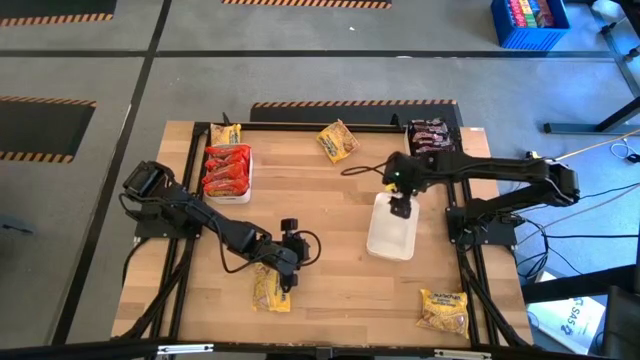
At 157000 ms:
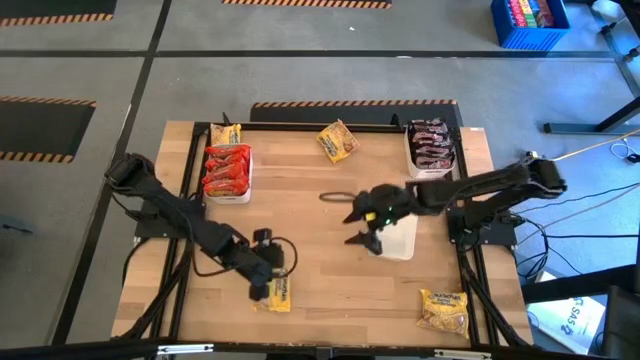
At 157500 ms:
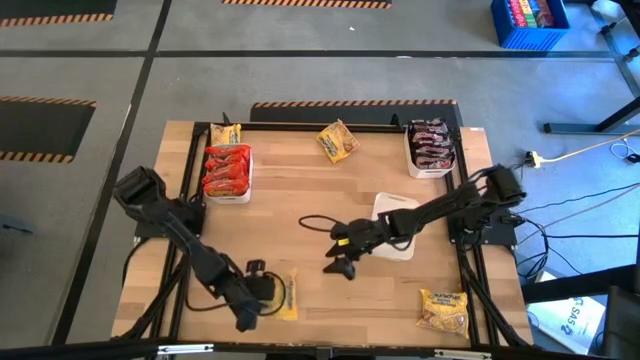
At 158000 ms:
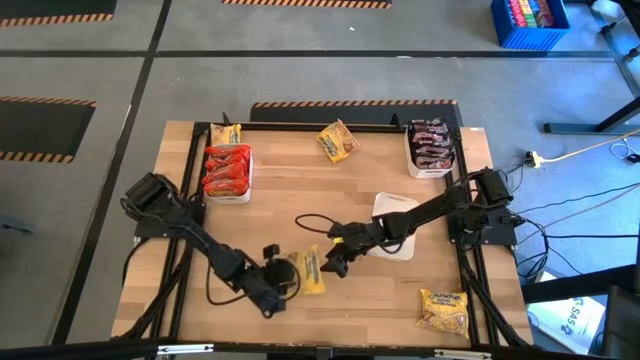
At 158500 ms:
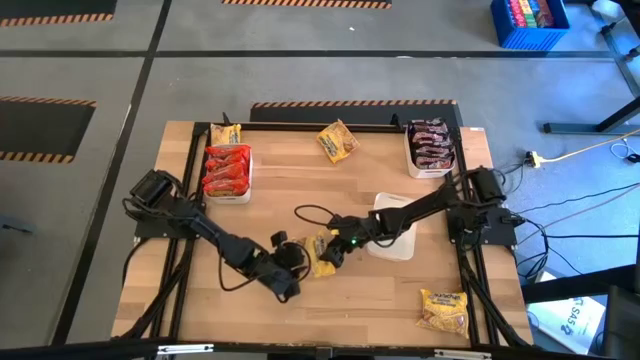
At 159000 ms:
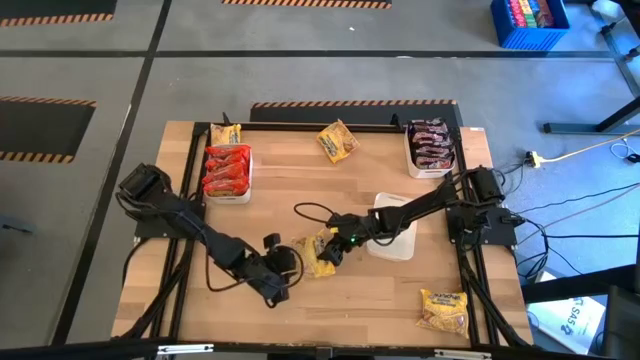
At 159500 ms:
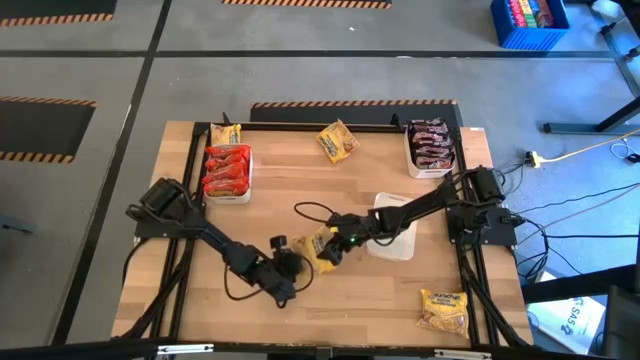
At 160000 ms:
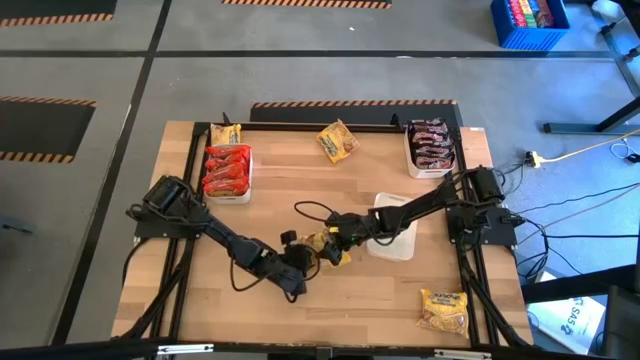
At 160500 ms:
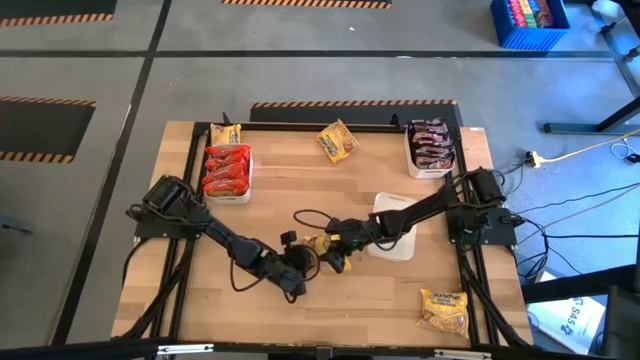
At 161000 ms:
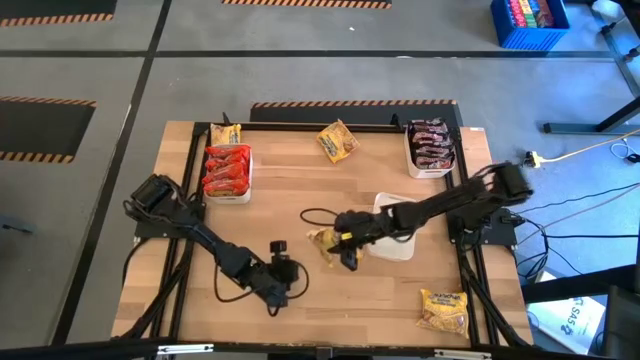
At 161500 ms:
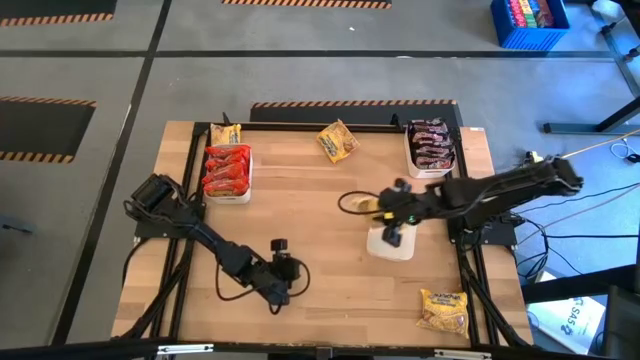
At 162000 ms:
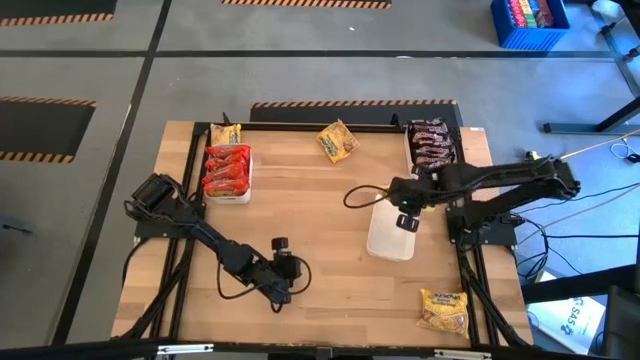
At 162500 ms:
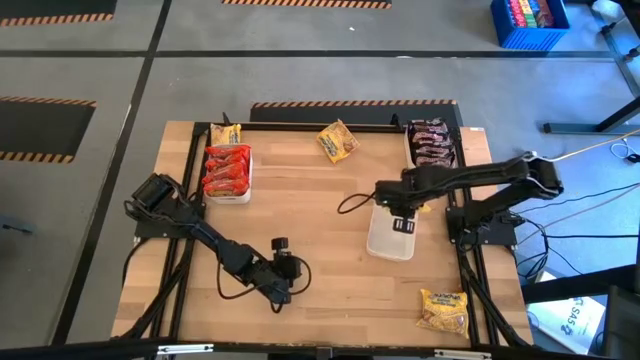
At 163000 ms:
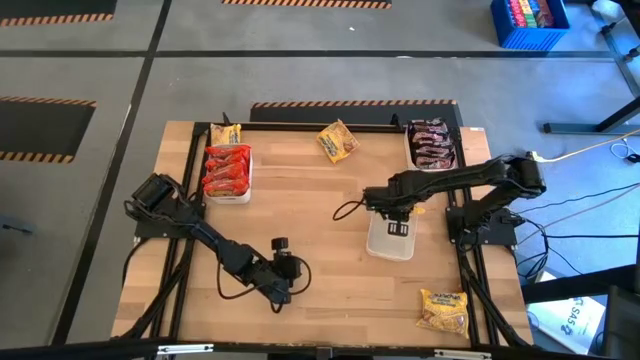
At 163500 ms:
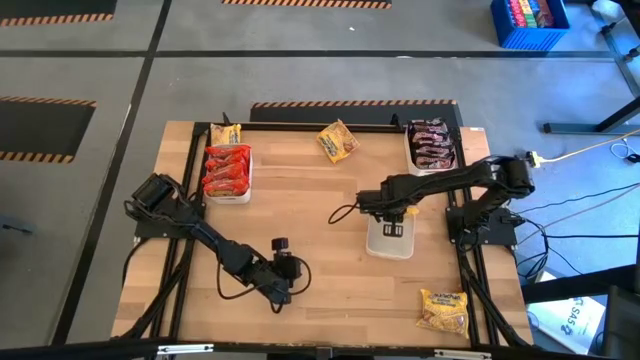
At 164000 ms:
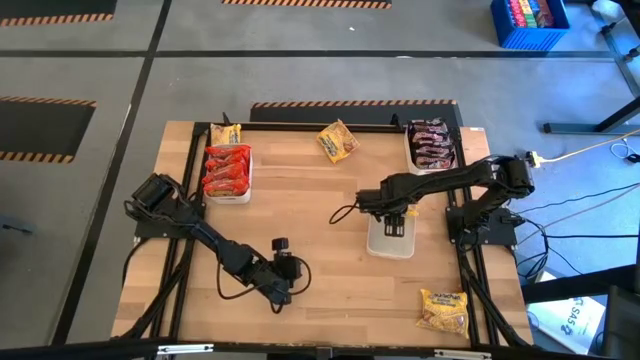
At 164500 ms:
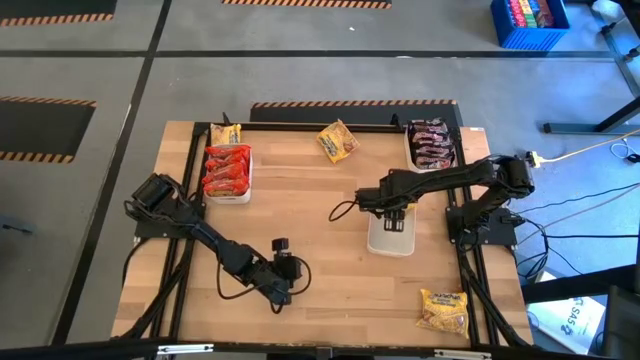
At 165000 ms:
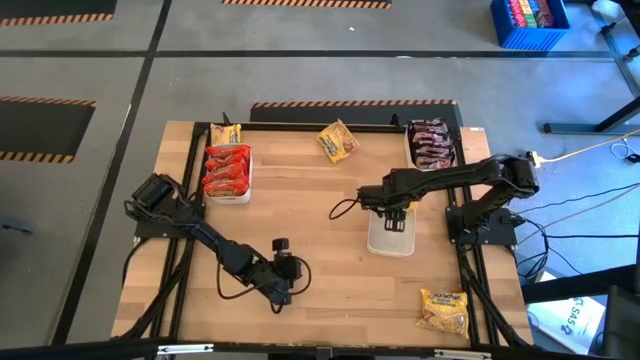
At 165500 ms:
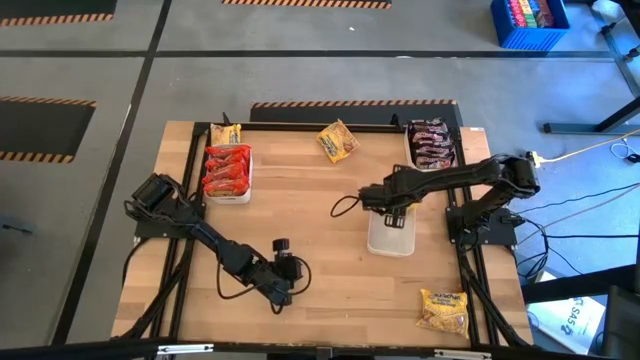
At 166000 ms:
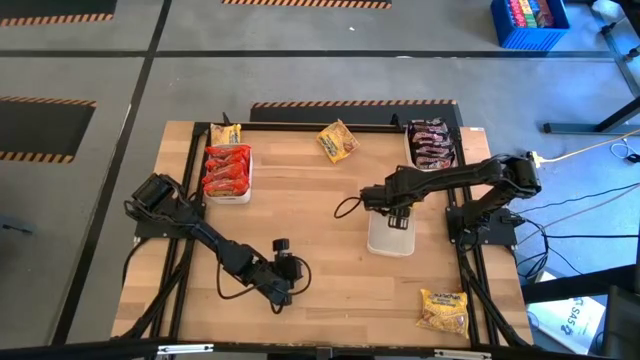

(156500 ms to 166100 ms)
Task: Sort Maruchan noodles
Put the bottom left yellow noodle into the bottom white bin

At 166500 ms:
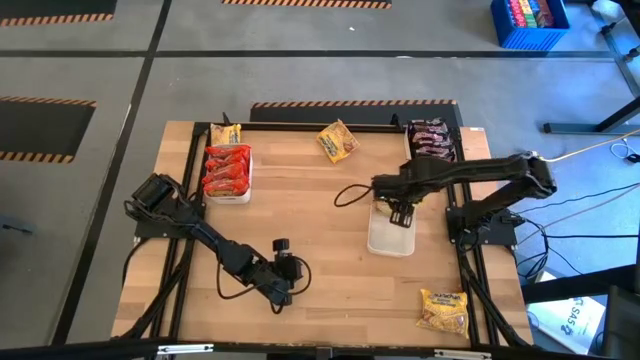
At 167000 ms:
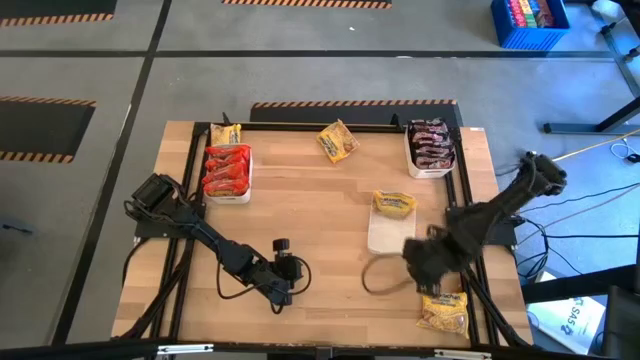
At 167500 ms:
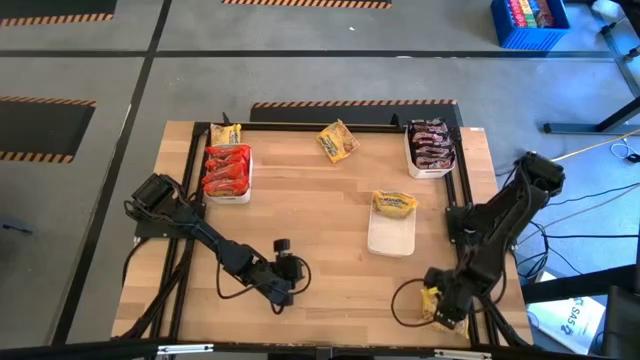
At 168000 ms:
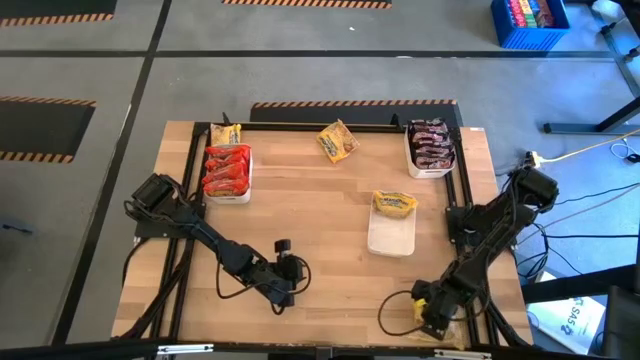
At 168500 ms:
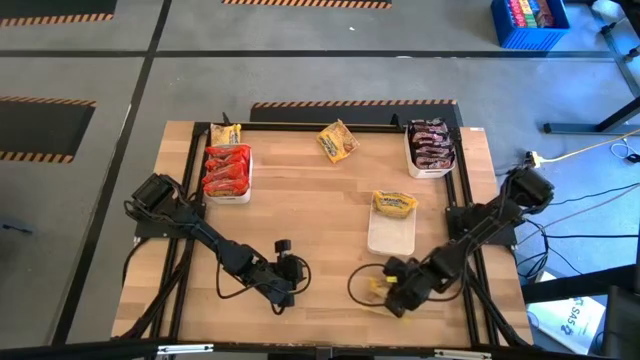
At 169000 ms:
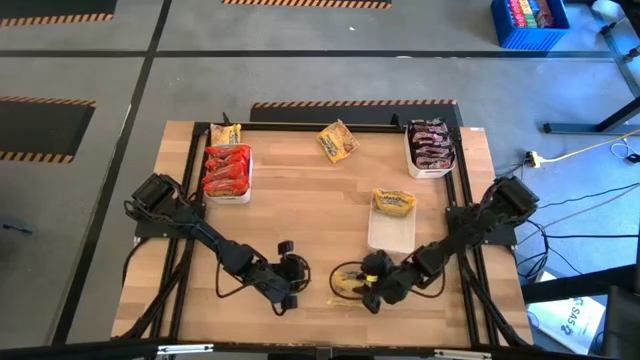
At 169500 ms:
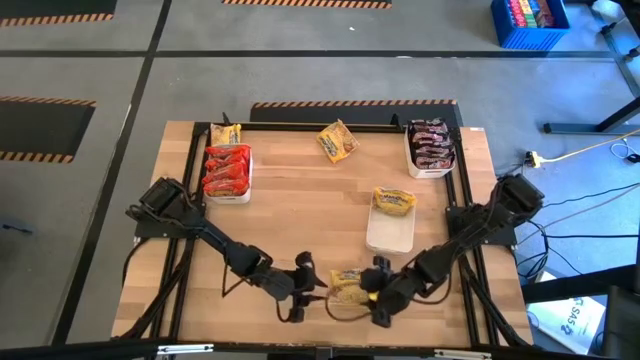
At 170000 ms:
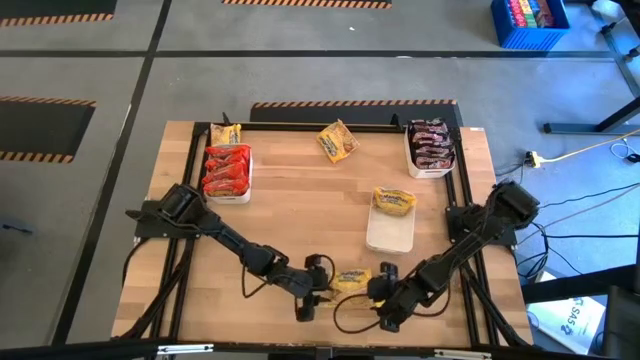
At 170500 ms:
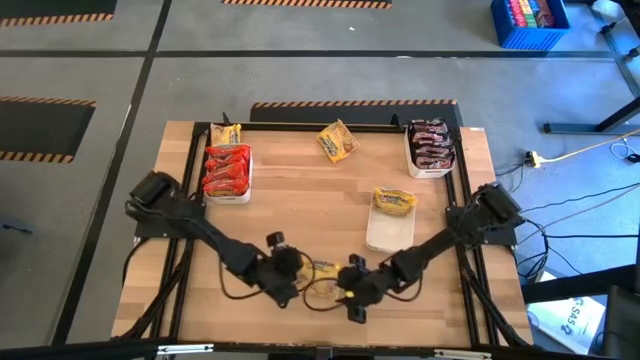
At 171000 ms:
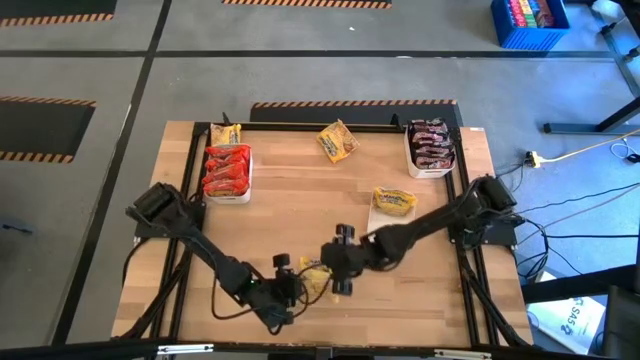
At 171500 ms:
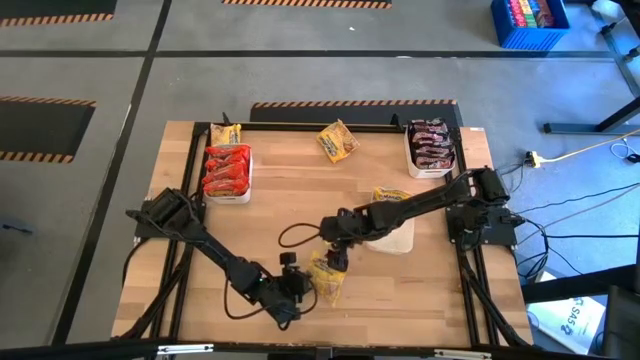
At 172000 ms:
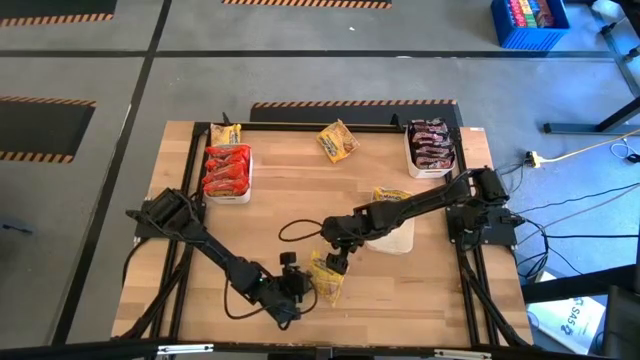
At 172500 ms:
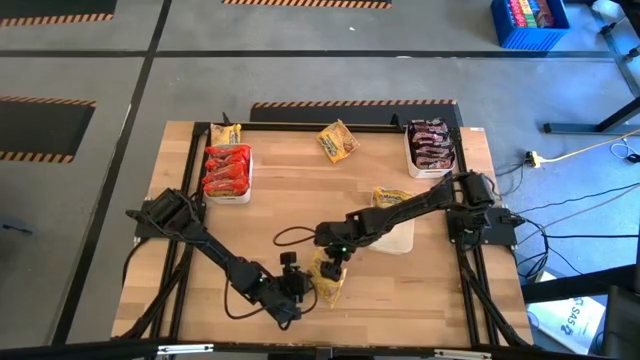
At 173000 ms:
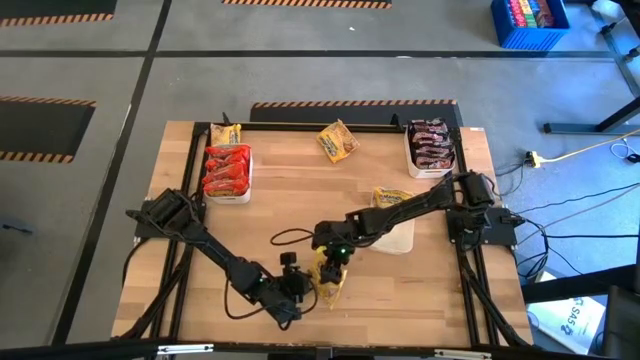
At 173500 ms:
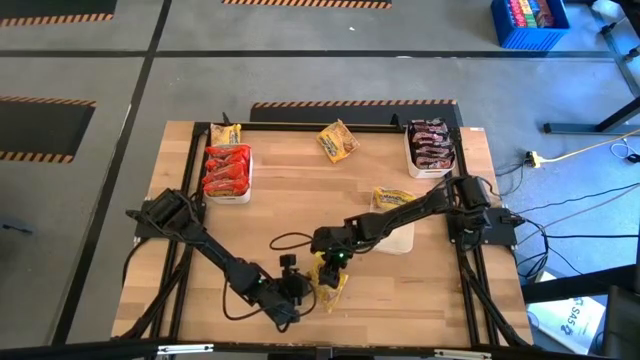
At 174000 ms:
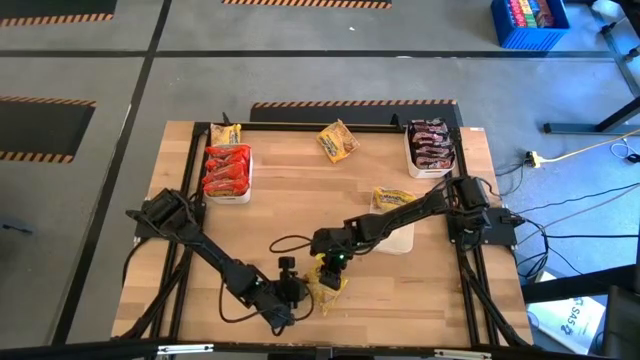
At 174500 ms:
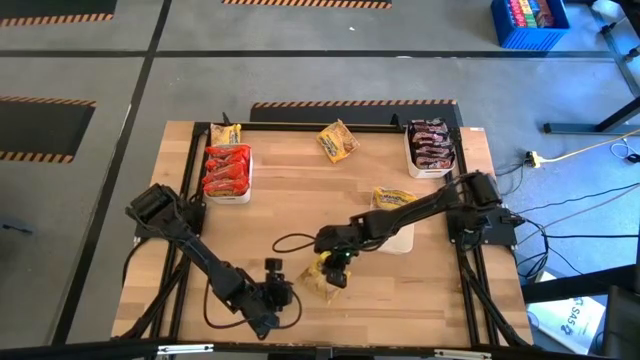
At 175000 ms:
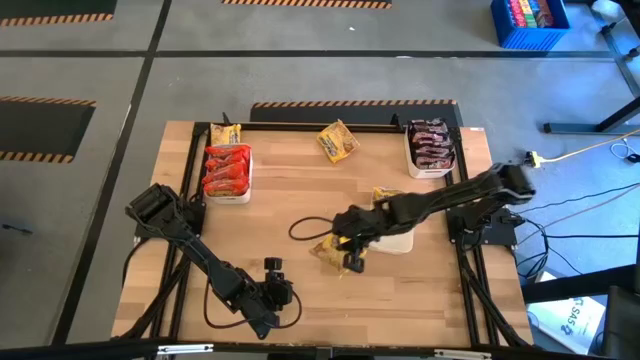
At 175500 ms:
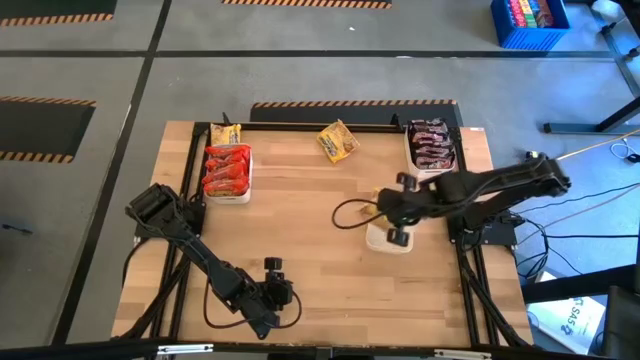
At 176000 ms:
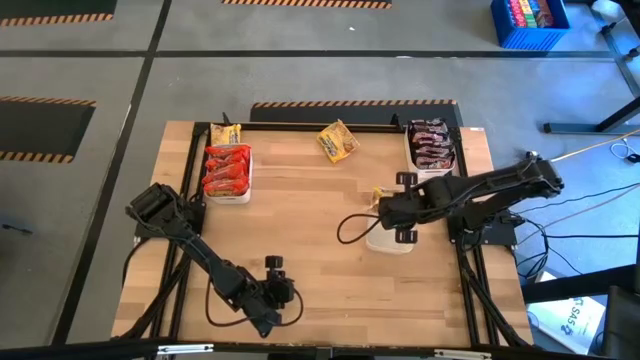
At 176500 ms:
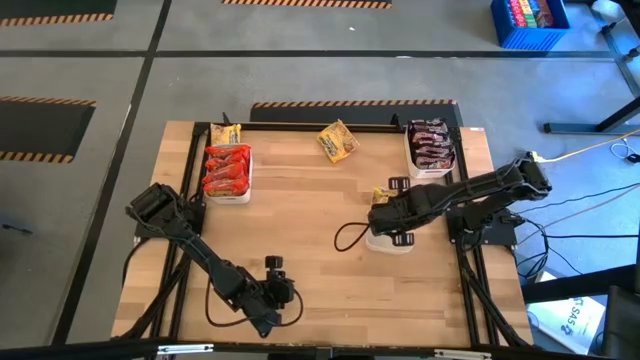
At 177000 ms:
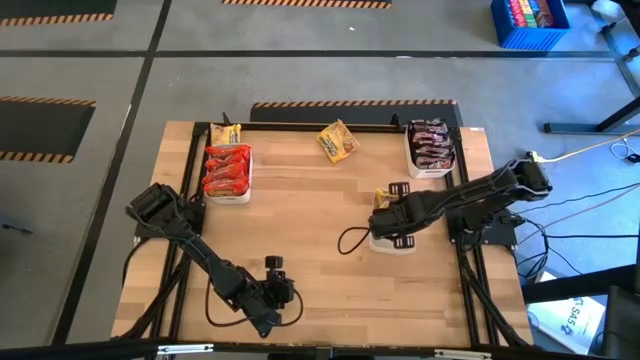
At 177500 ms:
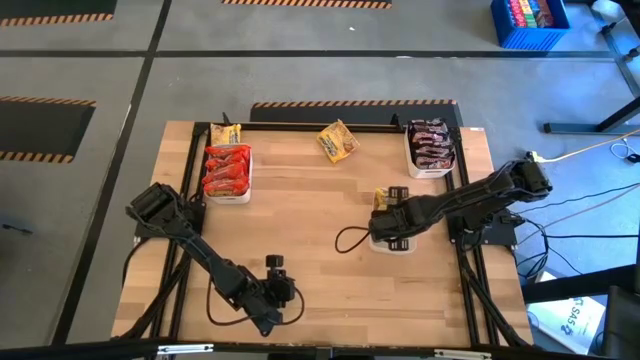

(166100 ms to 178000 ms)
Put the bottom yellow noodle into the bottom white bin
